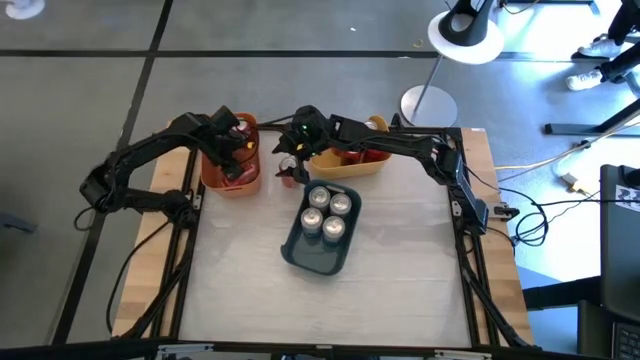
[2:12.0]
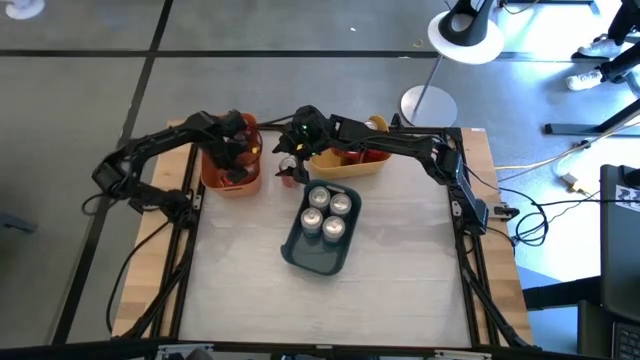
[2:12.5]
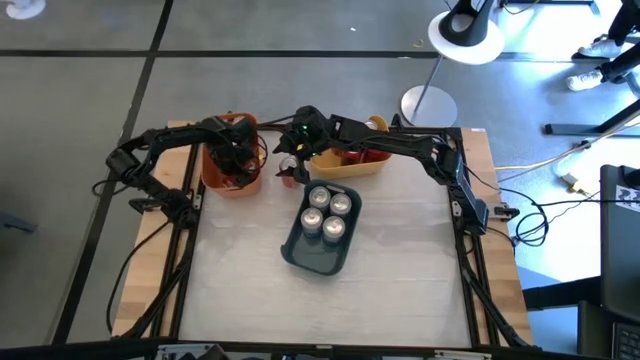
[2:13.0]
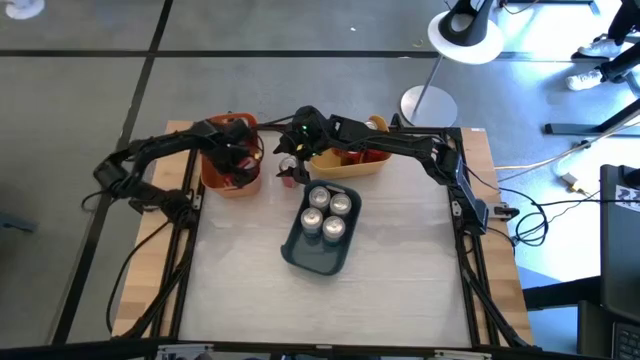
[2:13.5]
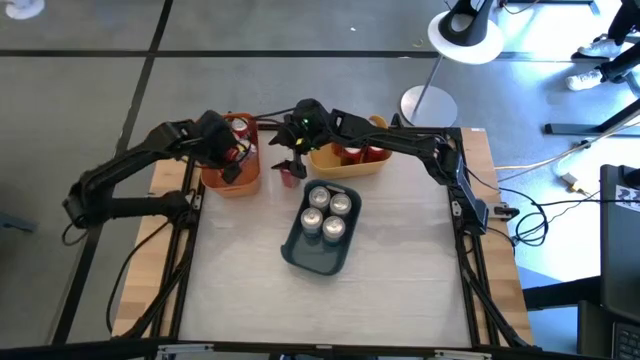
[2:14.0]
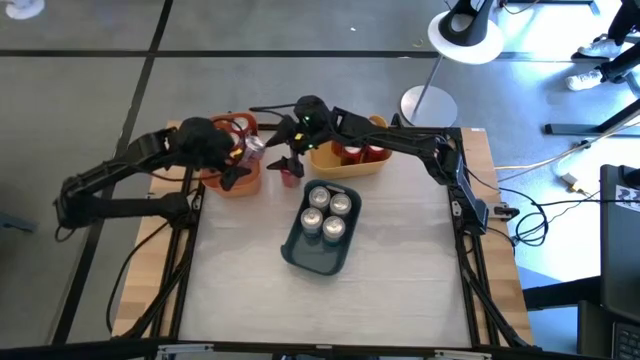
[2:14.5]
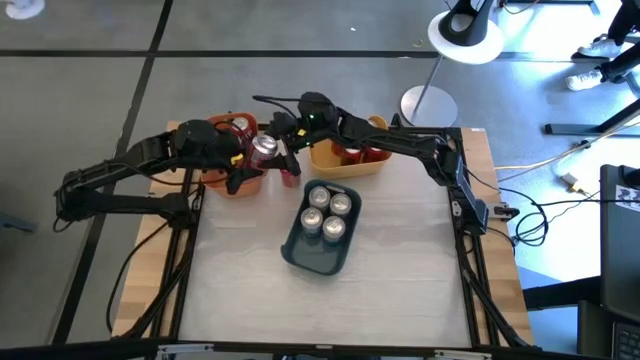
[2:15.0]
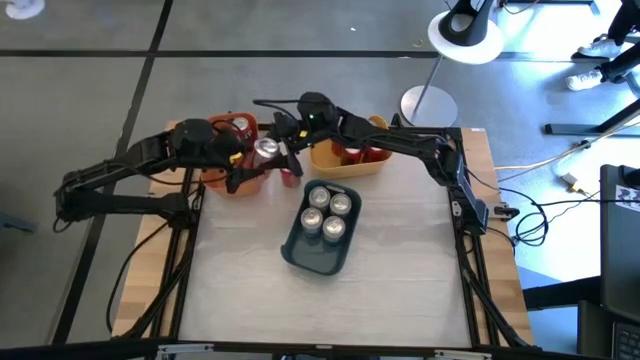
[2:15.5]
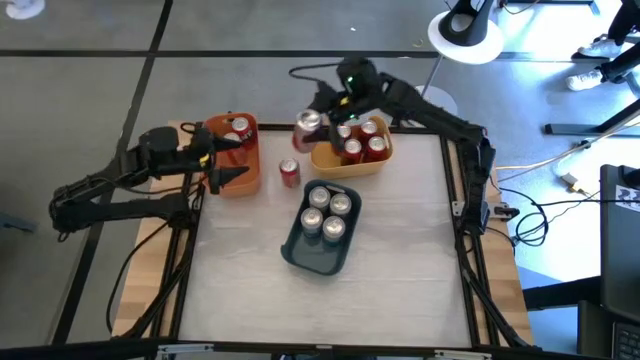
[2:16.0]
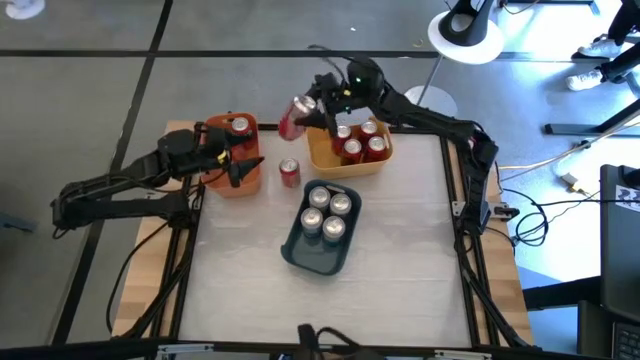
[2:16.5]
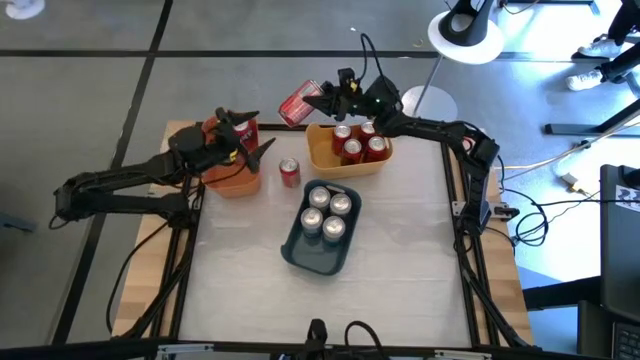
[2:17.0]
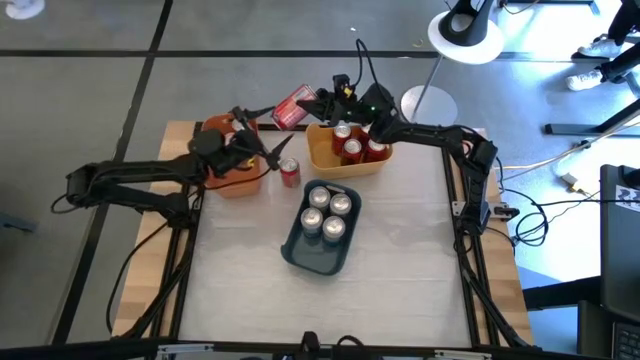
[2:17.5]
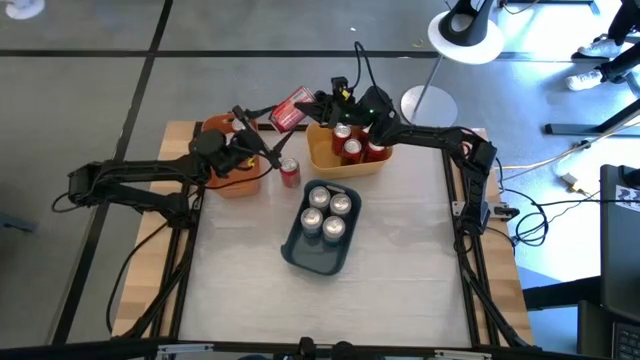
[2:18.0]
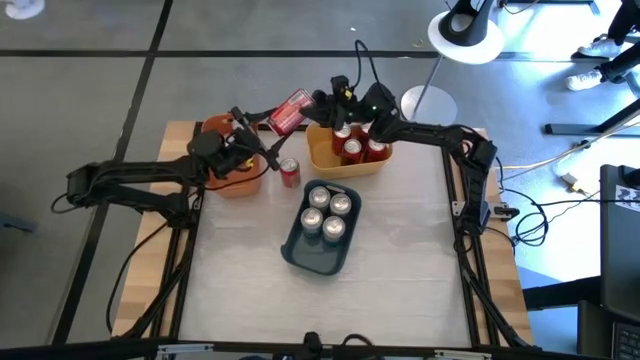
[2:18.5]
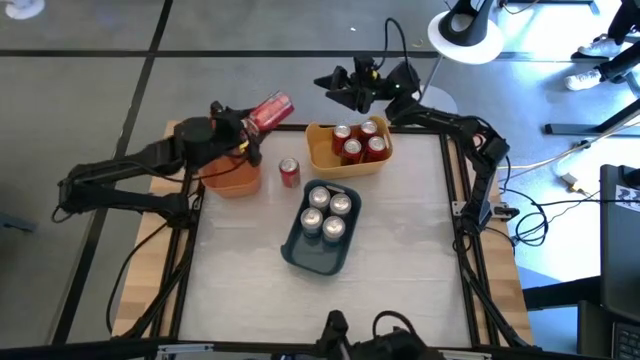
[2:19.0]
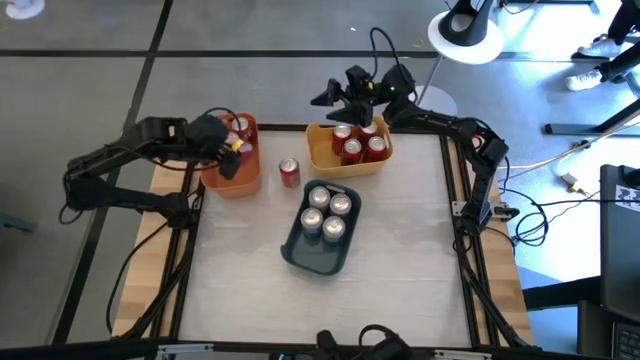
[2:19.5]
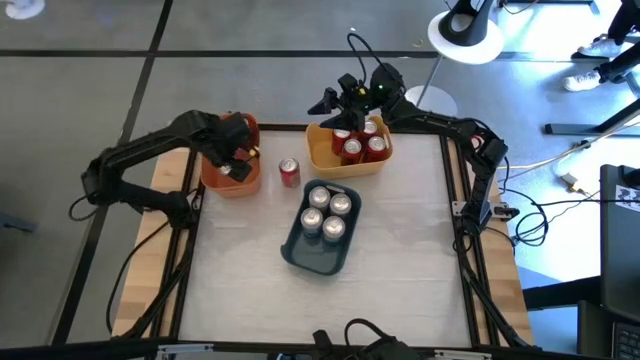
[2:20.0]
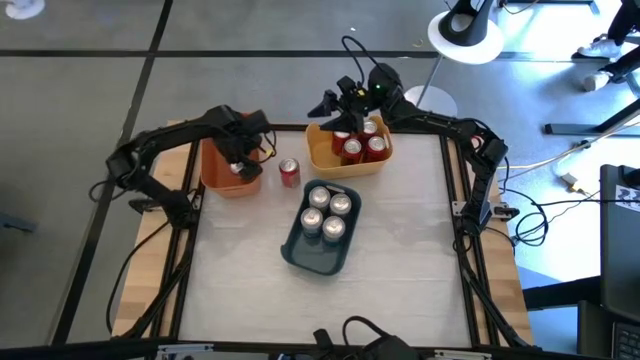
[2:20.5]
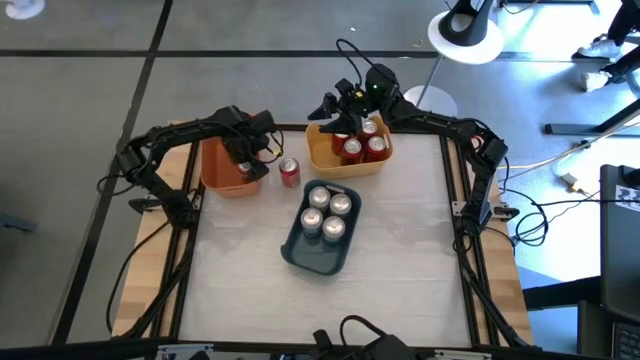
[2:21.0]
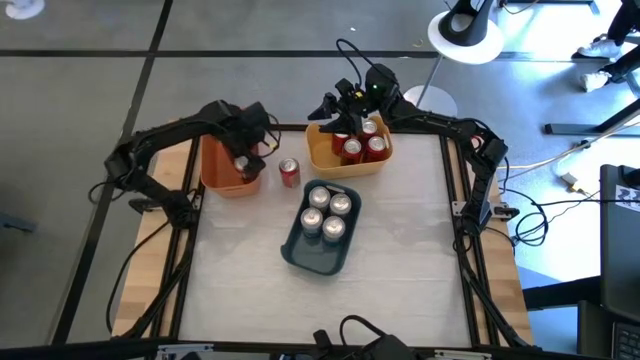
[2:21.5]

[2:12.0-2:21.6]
Task: Sort soda cans
Adjust the orange soda can inside the orange bin

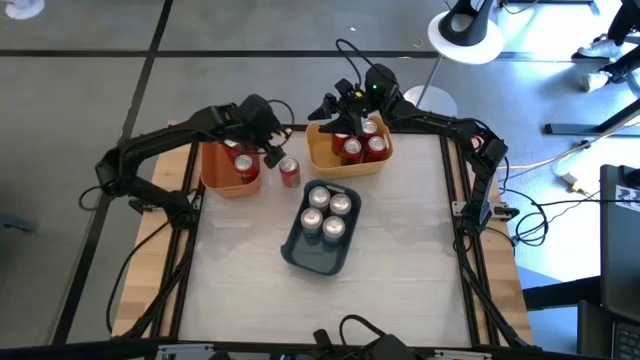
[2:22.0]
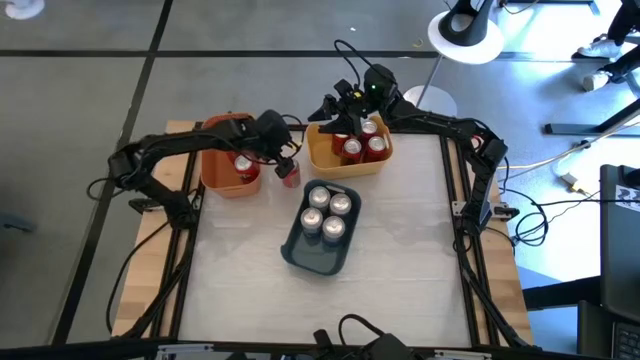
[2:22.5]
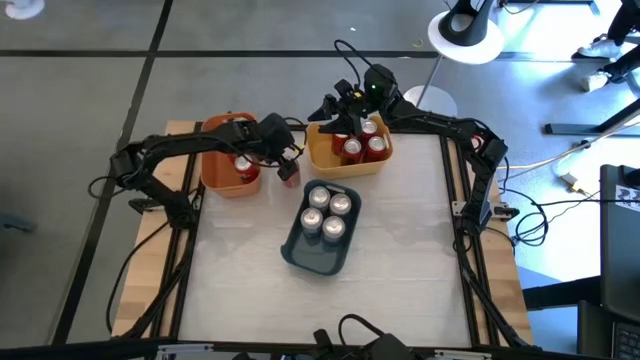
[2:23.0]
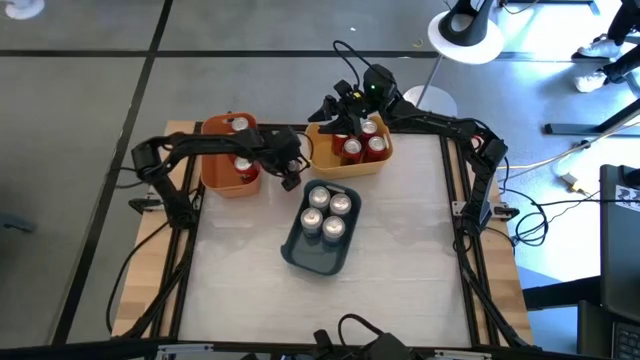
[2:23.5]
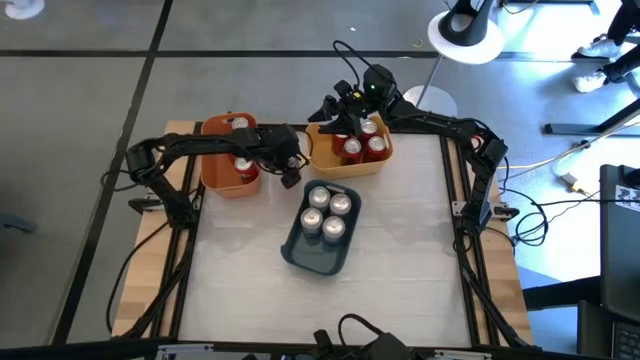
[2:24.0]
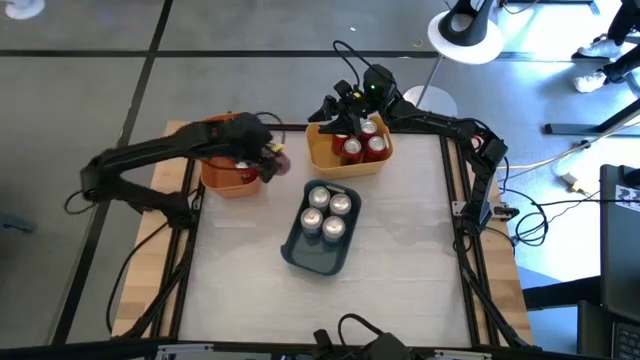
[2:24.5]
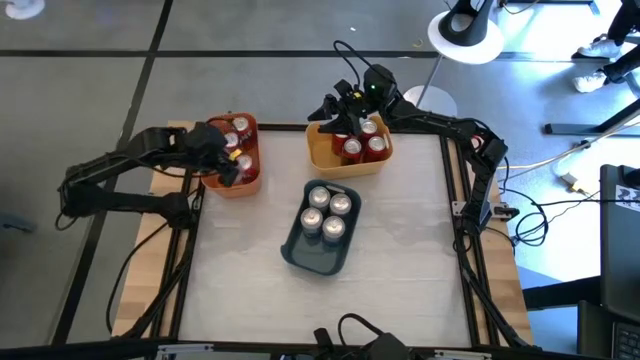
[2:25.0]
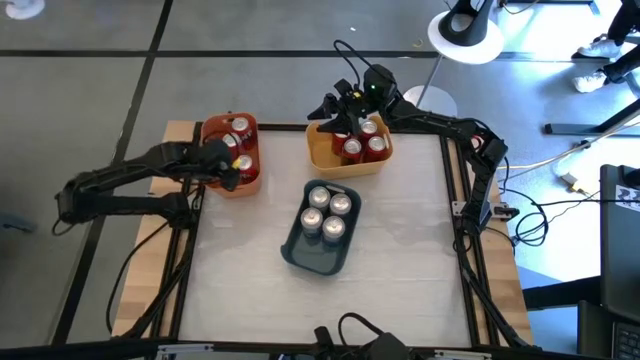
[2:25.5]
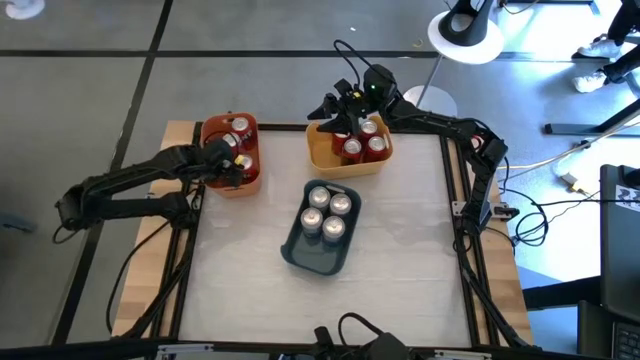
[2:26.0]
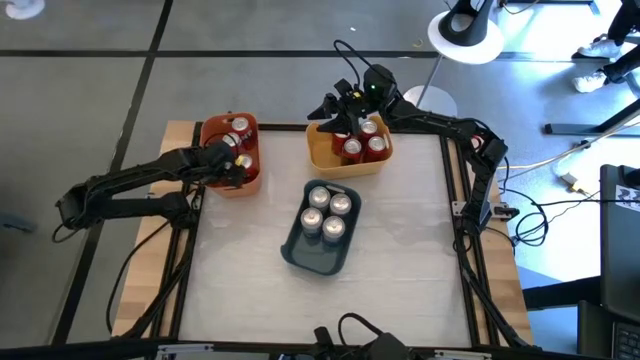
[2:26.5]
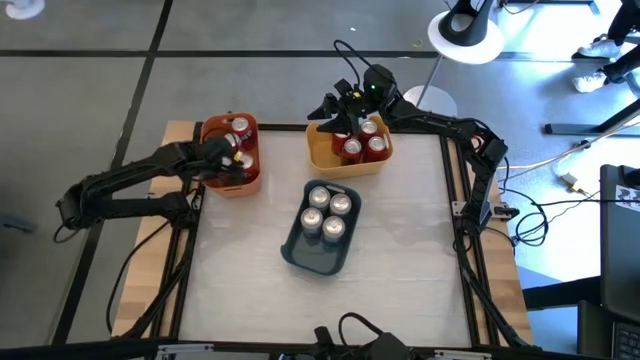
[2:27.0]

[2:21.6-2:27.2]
Put the orange soda can into the orange bin

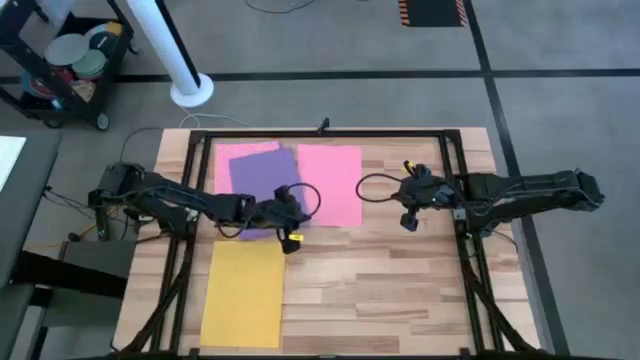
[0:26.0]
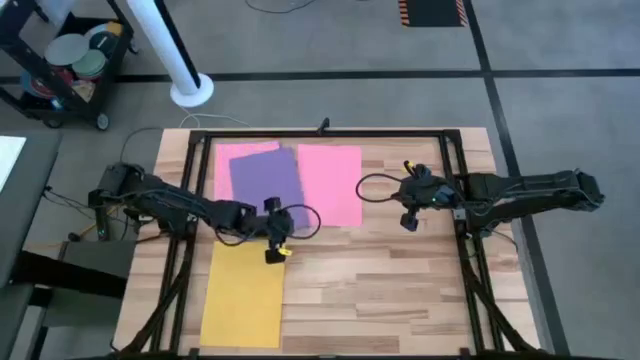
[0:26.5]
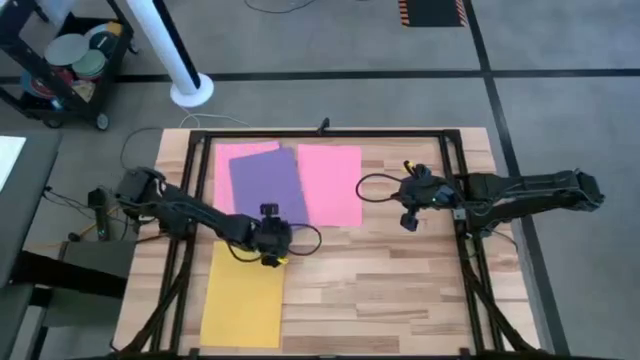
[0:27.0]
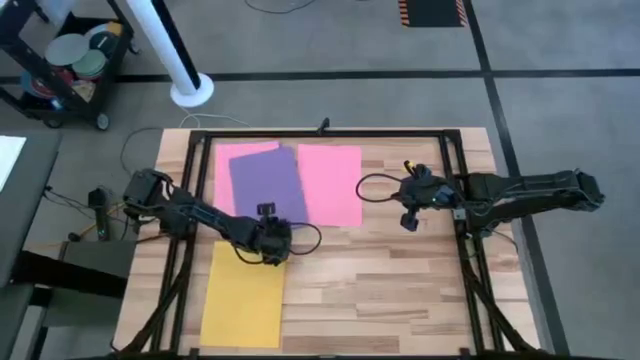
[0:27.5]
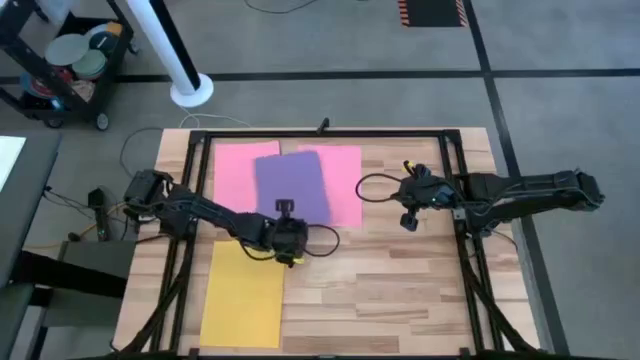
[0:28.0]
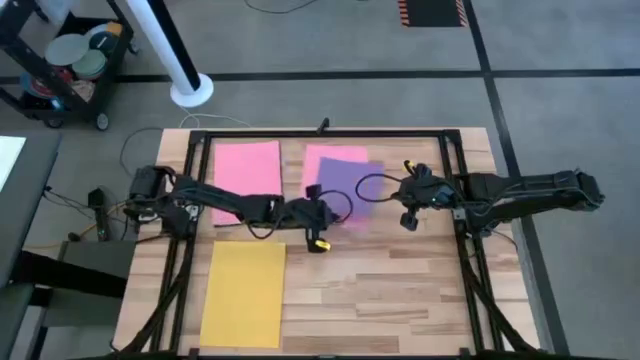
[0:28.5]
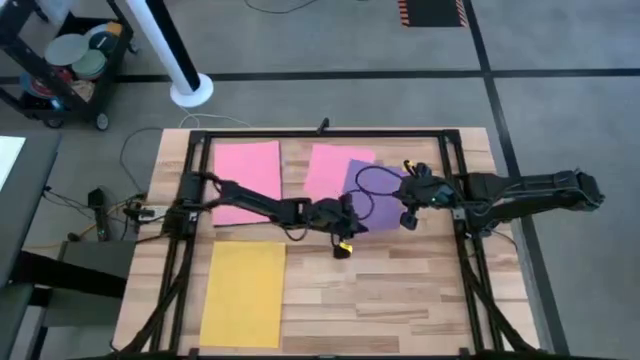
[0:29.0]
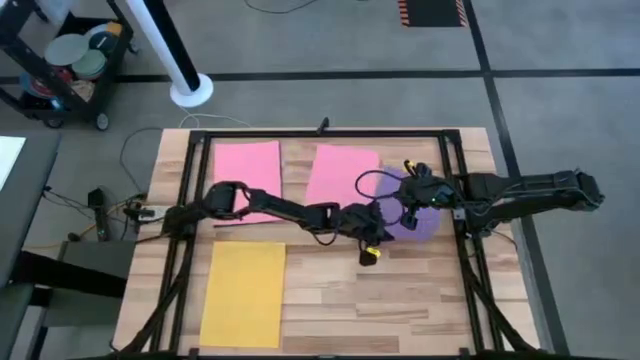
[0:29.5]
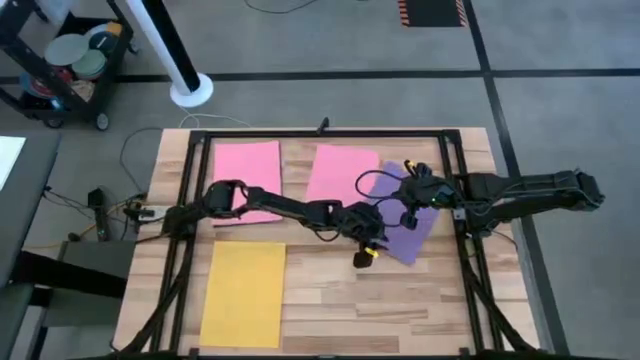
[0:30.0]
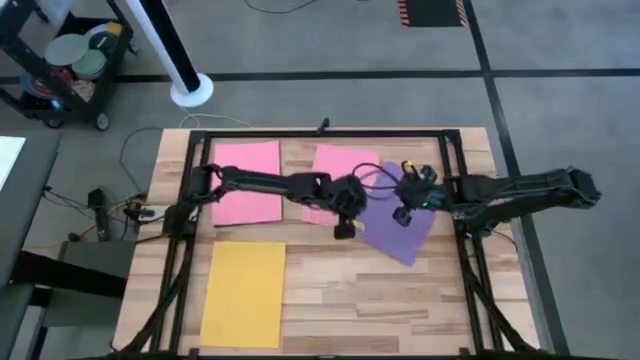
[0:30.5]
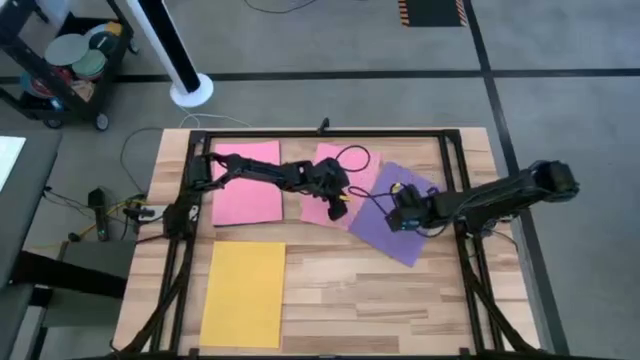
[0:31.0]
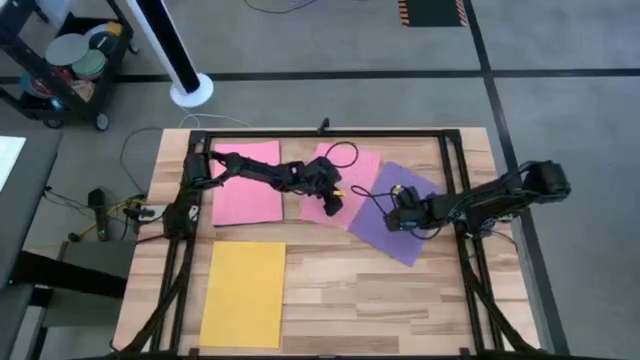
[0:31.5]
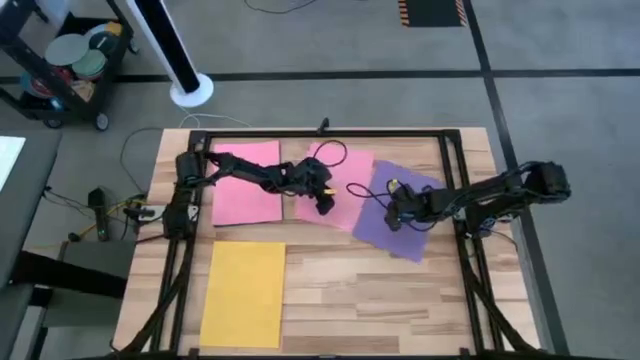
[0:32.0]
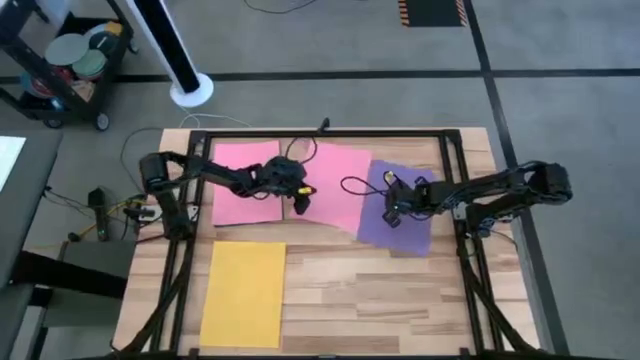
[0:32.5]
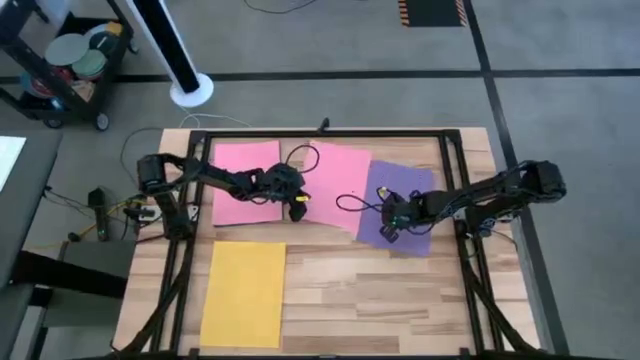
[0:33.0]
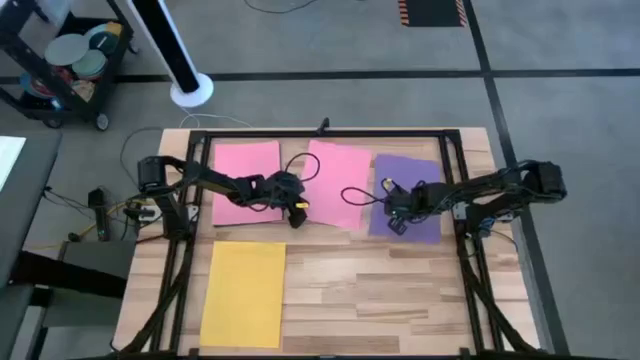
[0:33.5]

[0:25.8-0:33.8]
Task: Organize paper
Put the violet paper to the top right on the table
